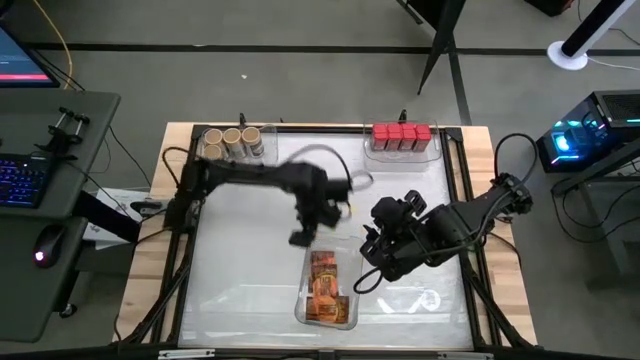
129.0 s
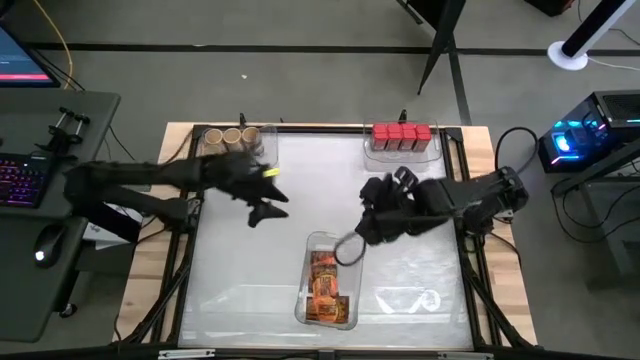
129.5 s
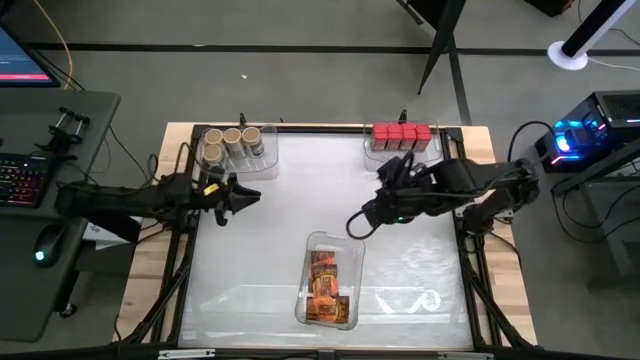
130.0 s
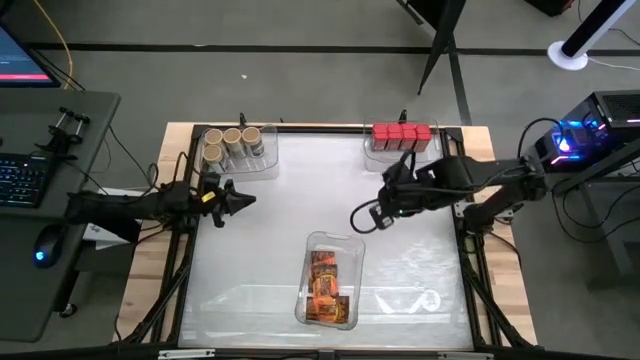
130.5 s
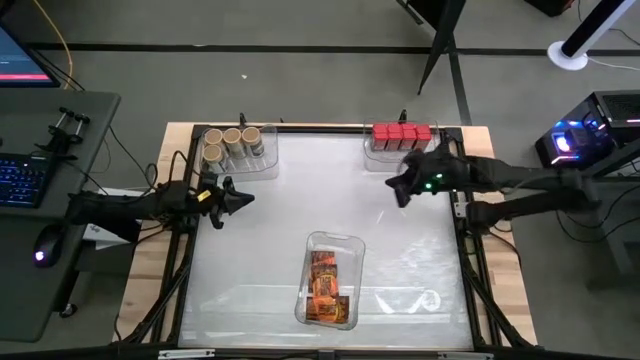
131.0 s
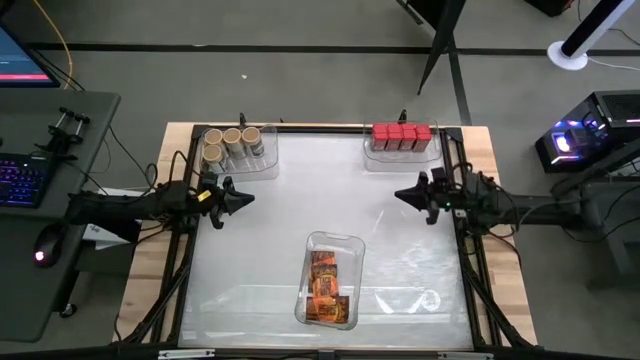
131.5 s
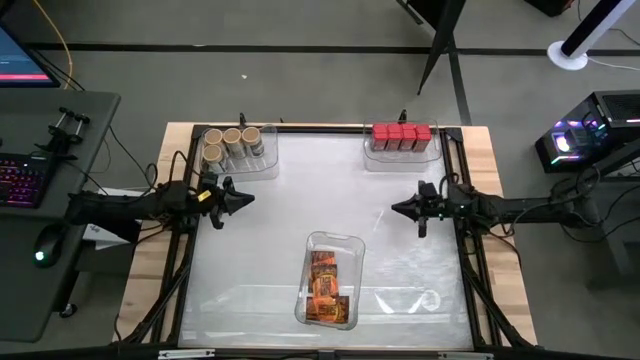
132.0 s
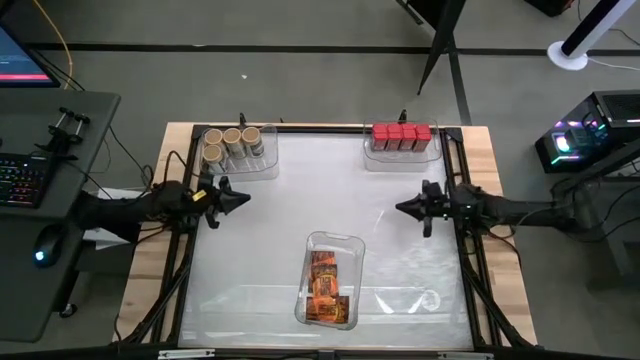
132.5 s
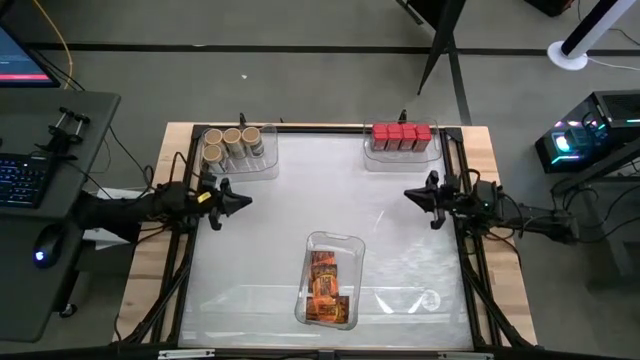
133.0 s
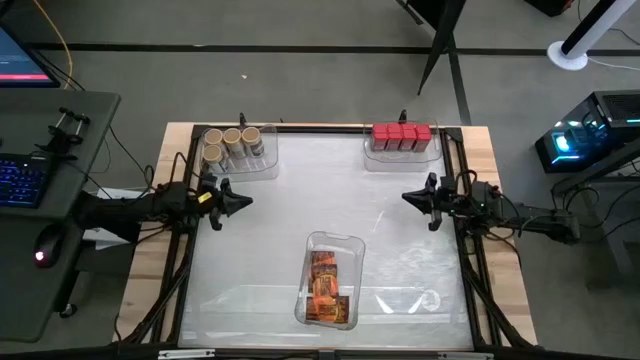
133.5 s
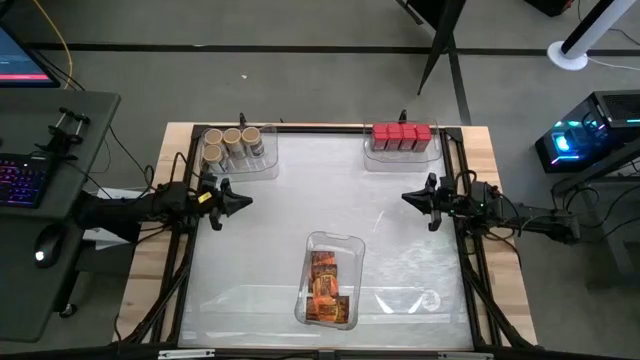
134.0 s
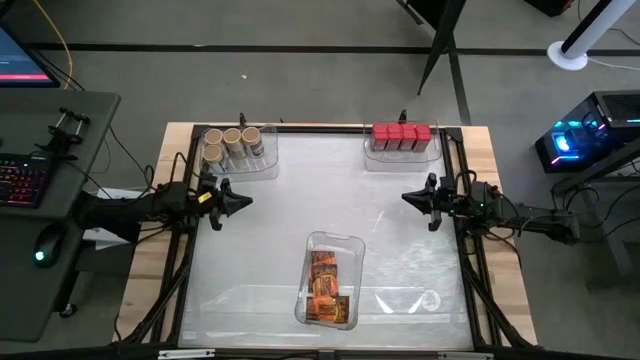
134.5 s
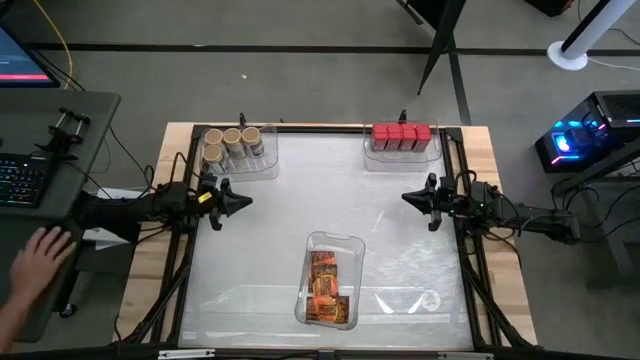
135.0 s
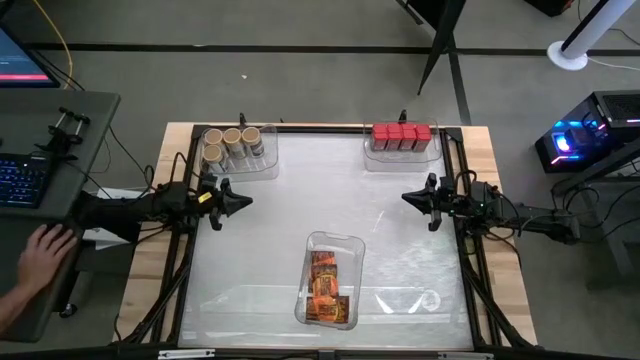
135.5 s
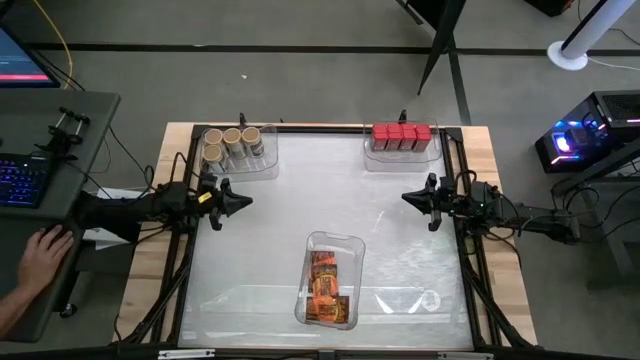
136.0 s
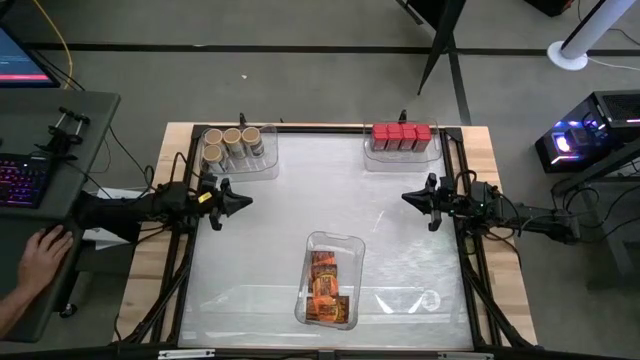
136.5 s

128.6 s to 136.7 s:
Task: Sort spices by type
Return to Home Position

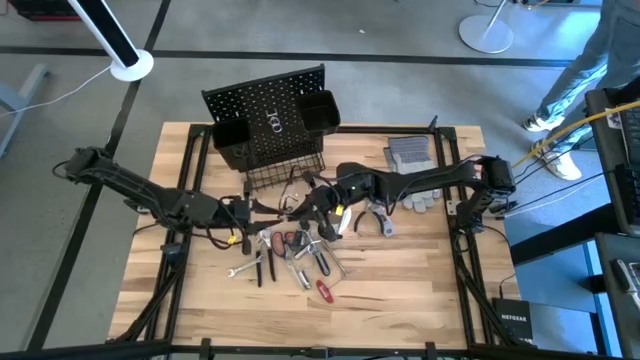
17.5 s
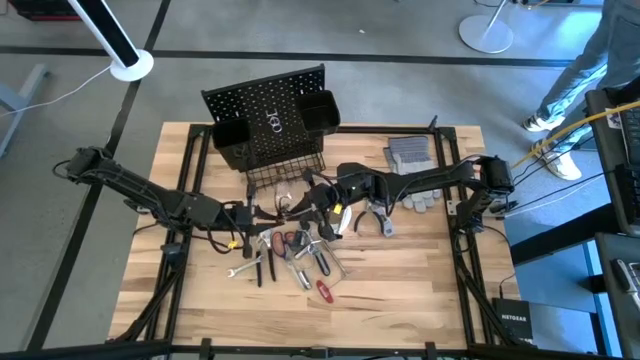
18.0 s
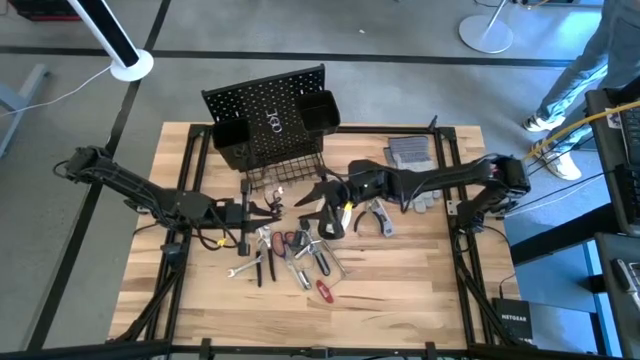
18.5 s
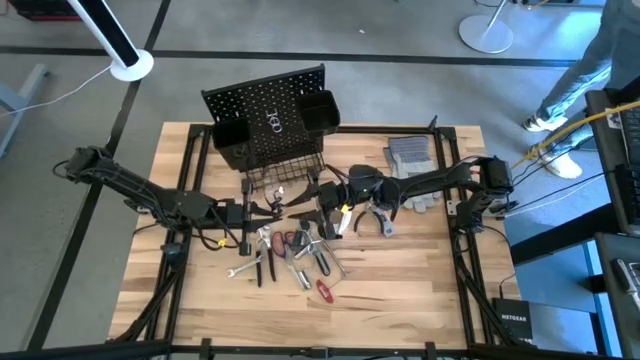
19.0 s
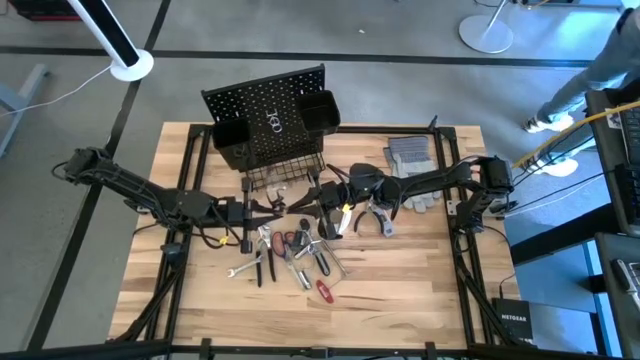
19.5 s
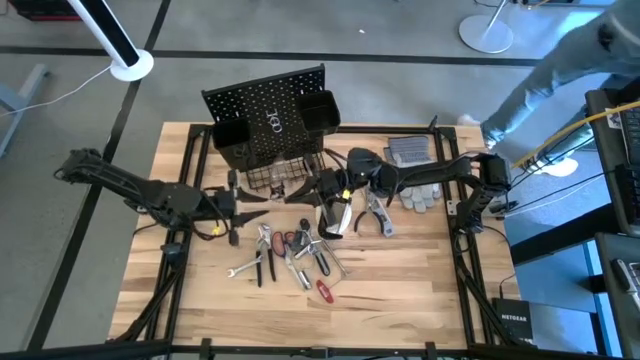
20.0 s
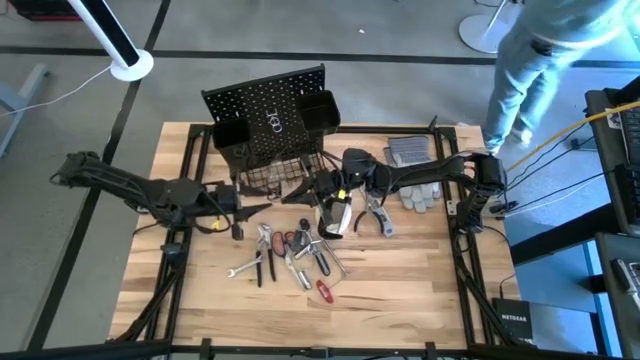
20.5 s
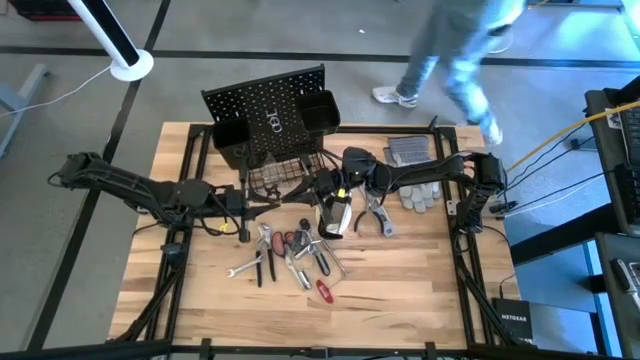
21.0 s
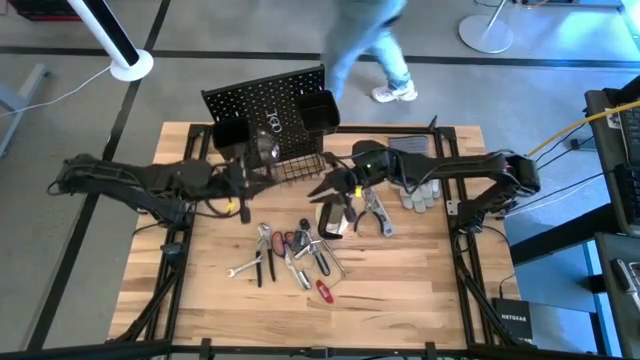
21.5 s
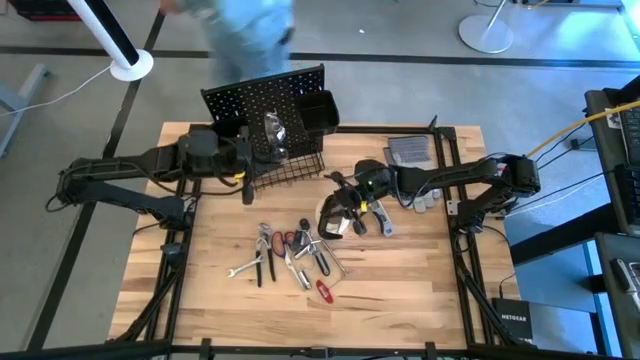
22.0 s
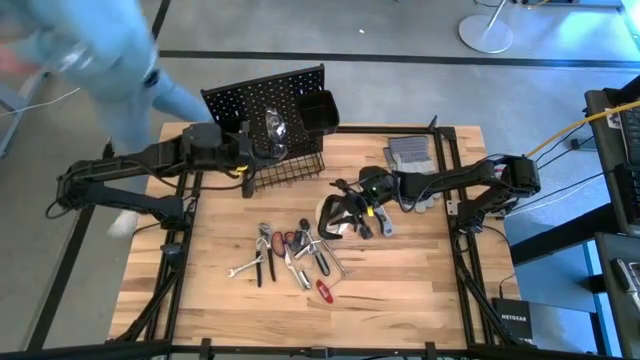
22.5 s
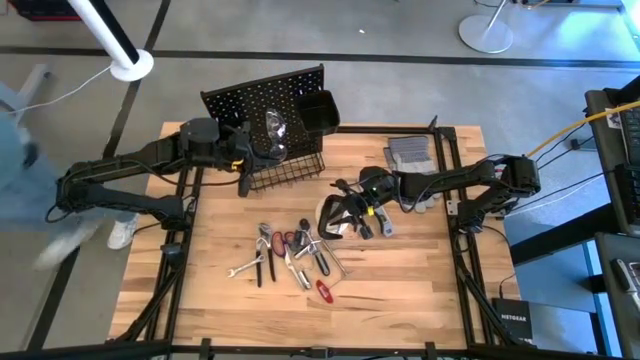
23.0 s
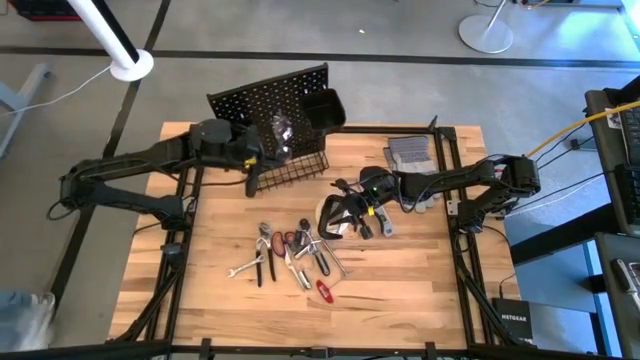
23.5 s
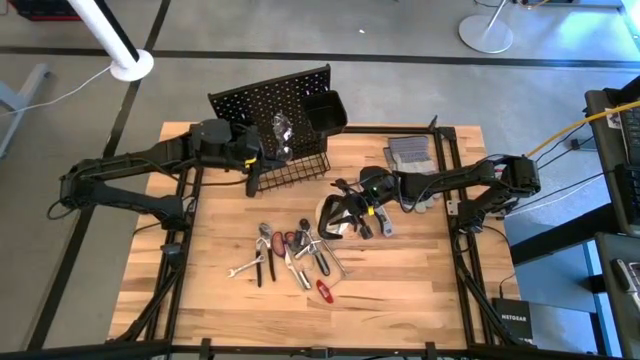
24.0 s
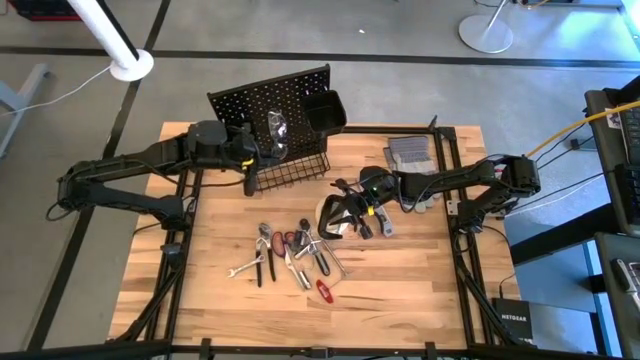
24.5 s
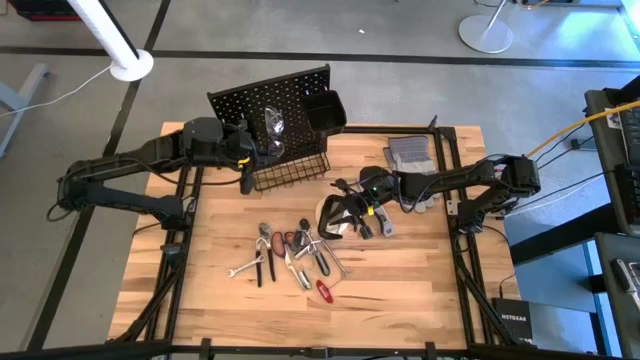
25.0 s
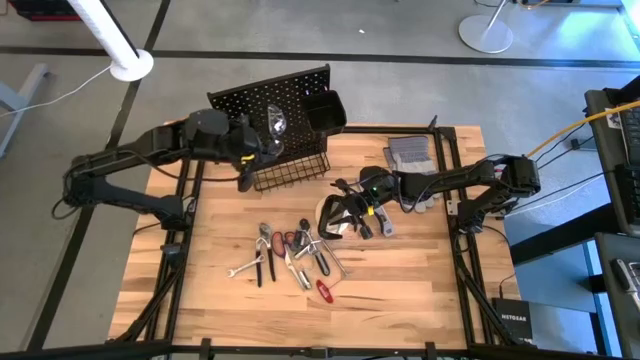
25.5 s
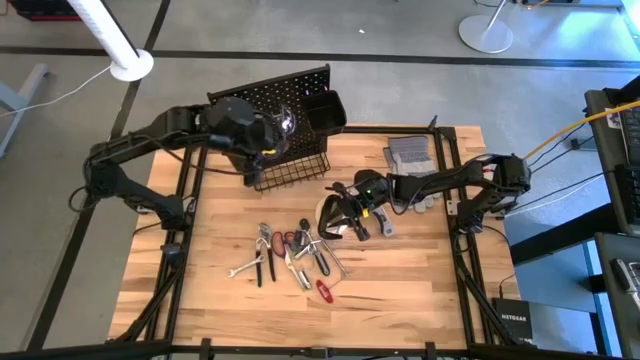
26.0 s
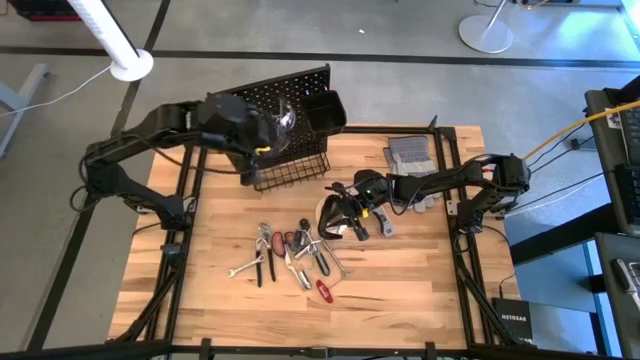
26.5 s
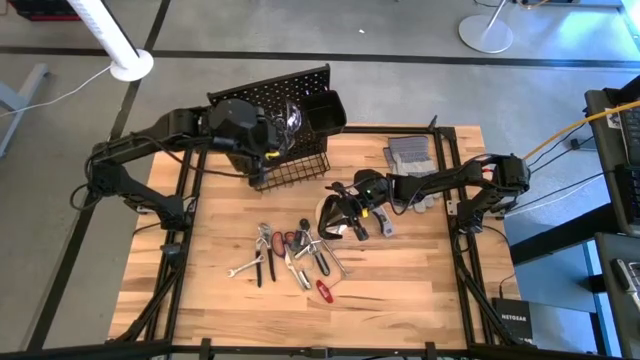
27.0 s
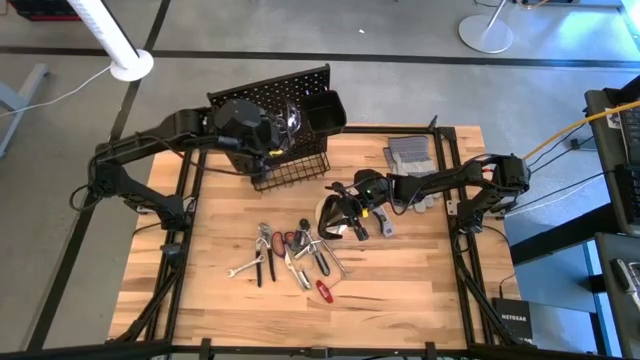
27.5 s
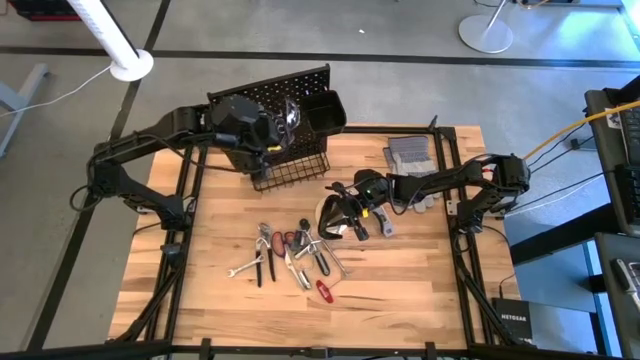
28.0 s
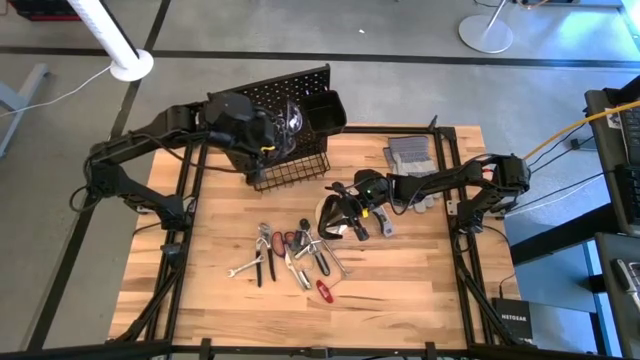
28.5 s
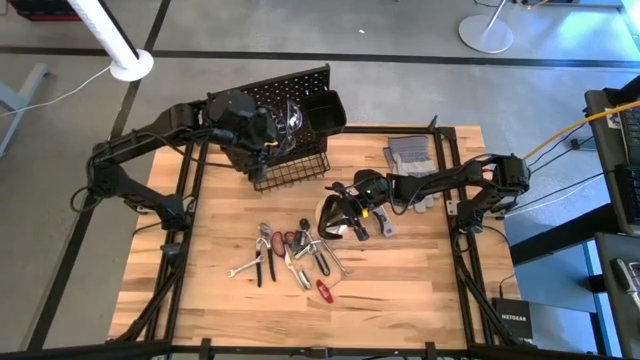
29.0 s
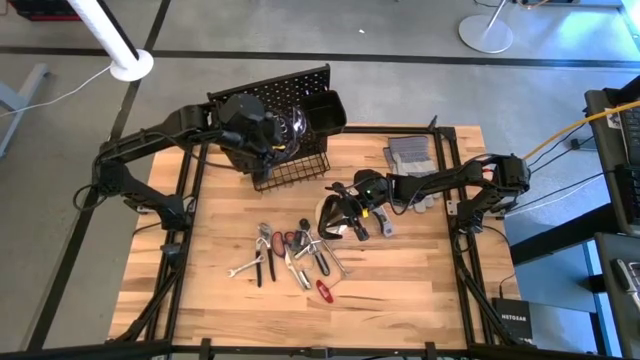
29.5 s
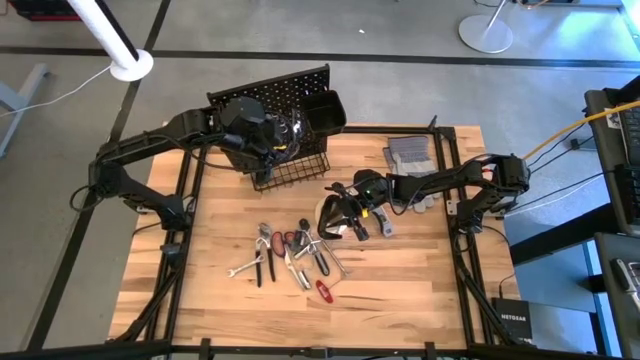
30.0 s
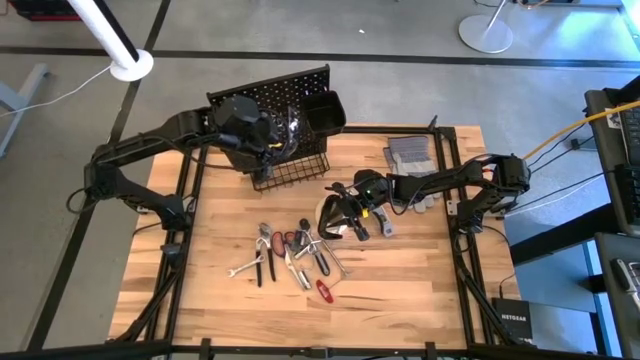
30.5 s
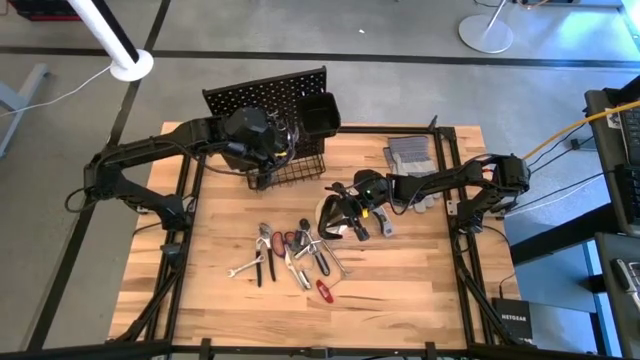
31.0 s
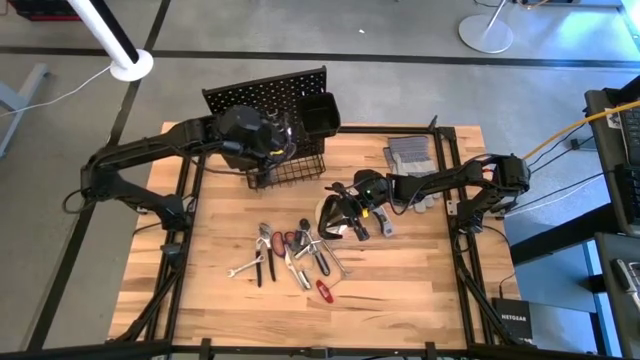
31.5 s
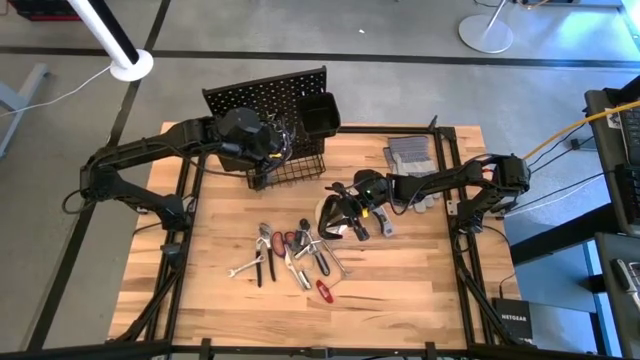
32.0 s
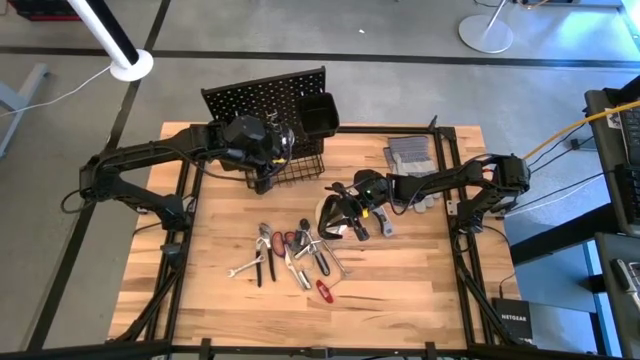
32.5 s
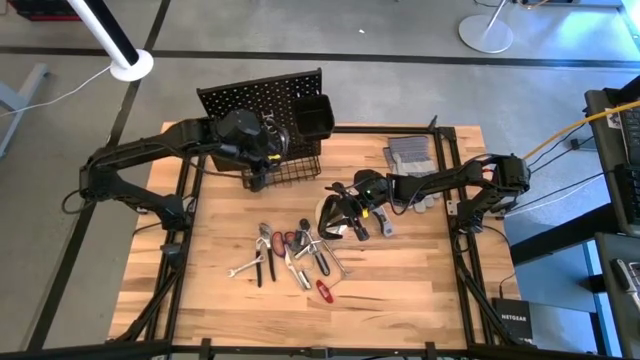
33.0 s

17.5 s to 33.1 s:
Task: Hang tools onto peg board
Hang the safety glasses on the pegboard
